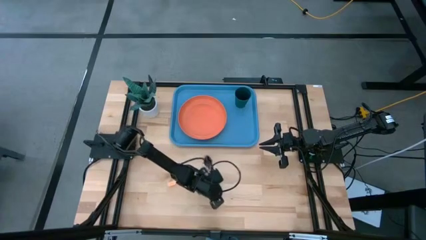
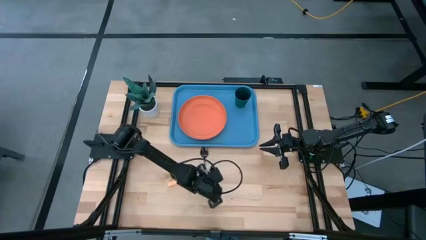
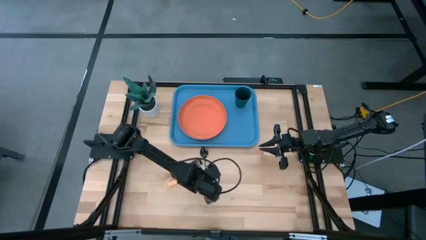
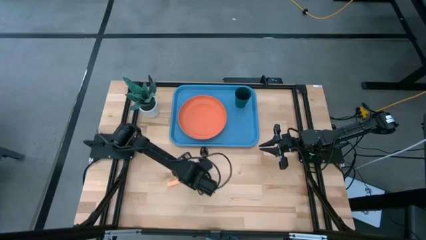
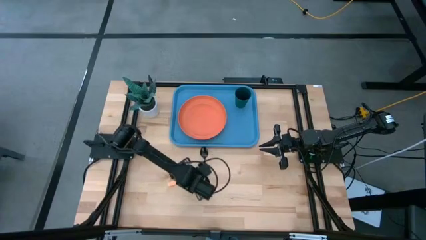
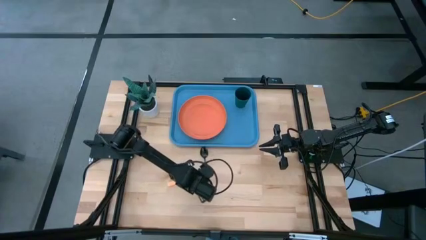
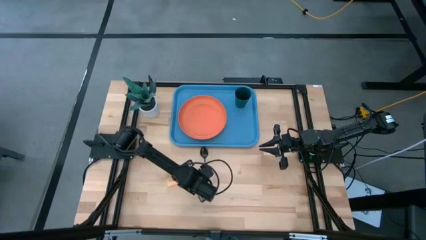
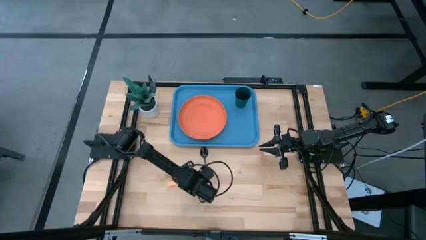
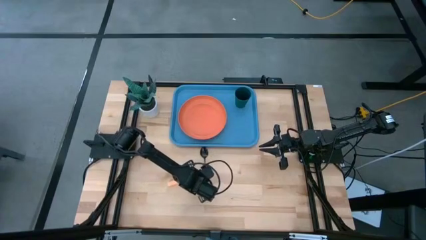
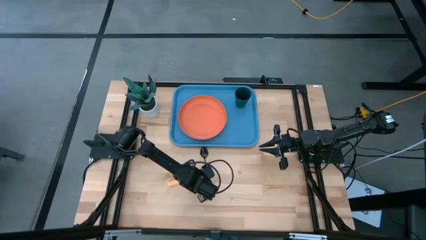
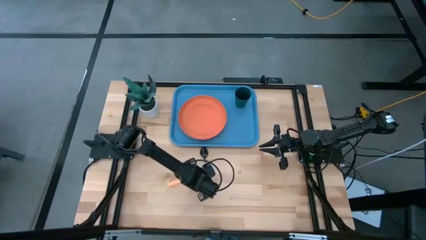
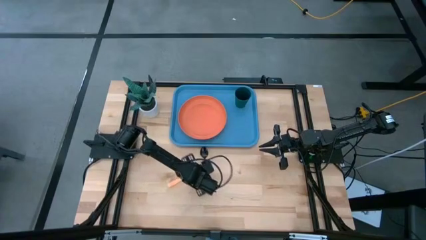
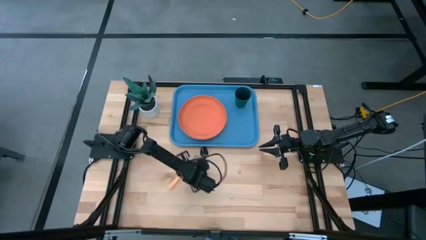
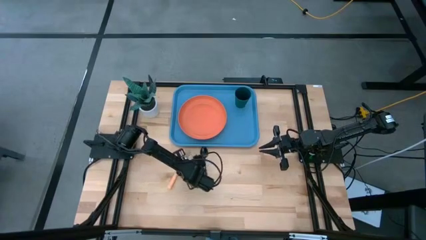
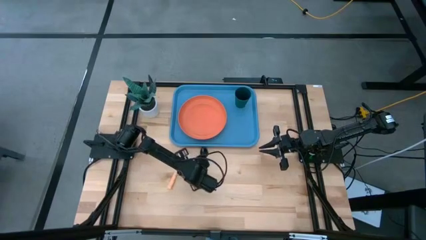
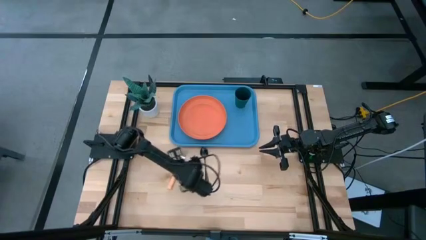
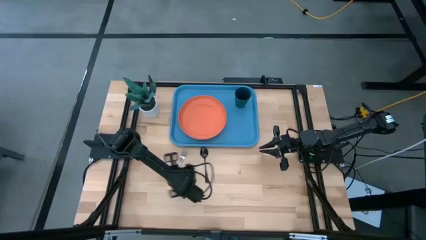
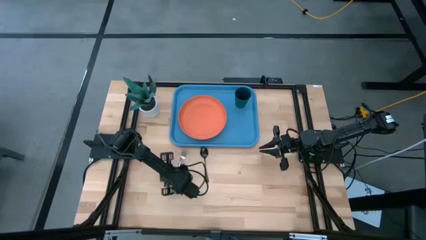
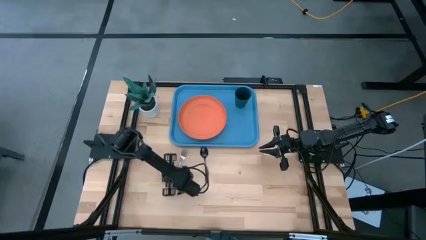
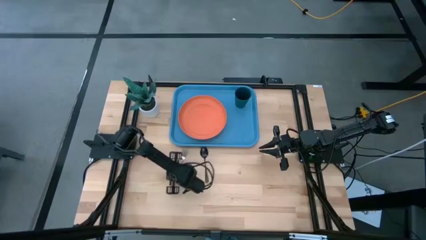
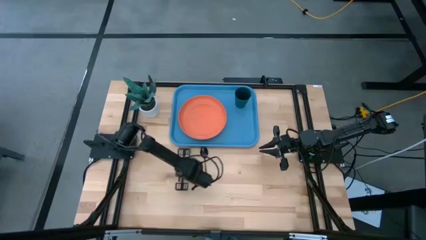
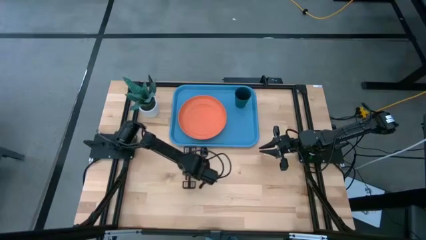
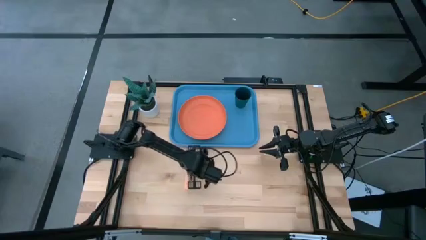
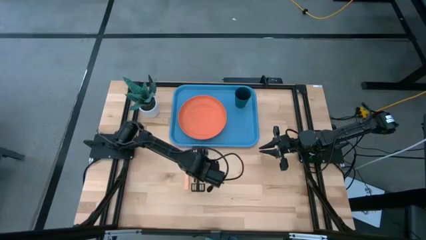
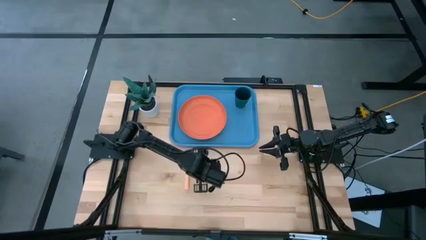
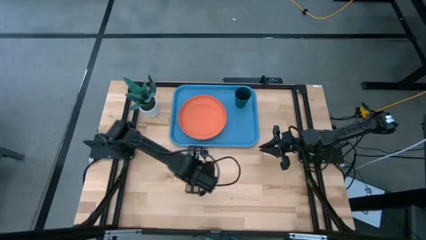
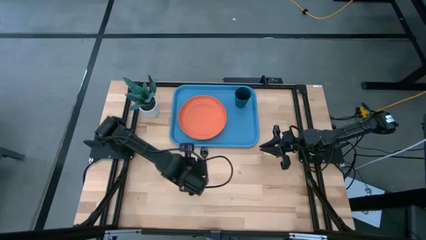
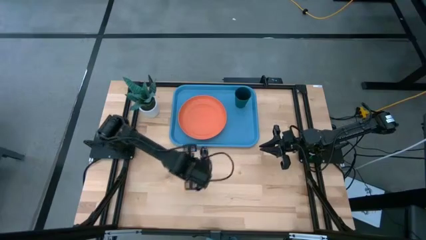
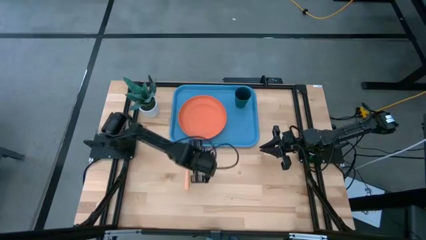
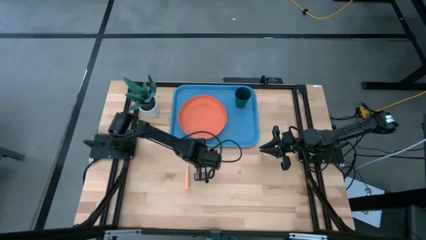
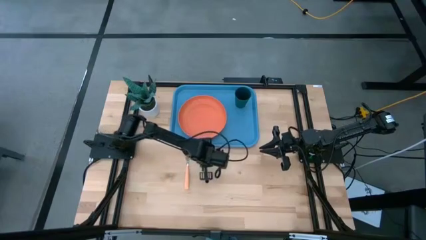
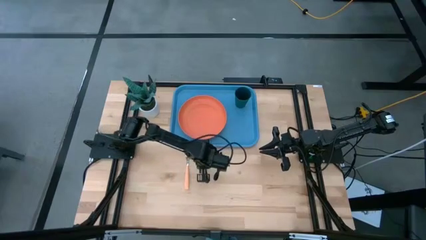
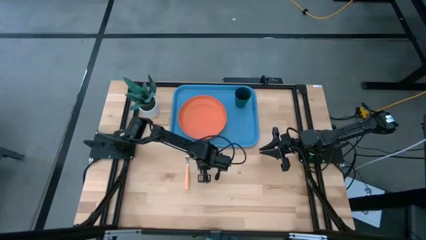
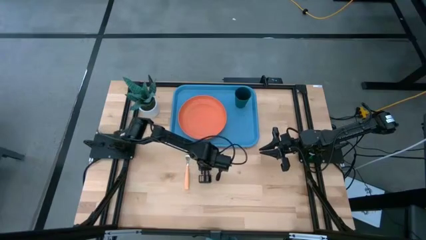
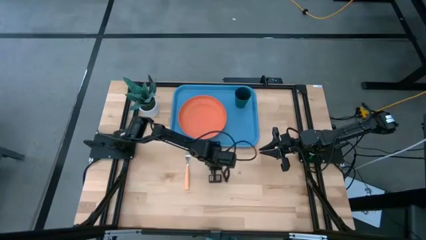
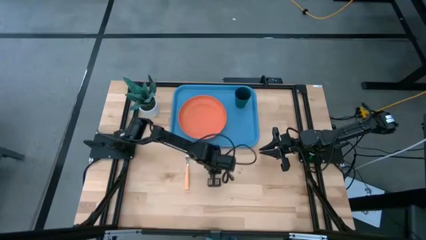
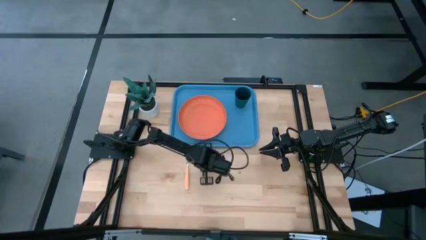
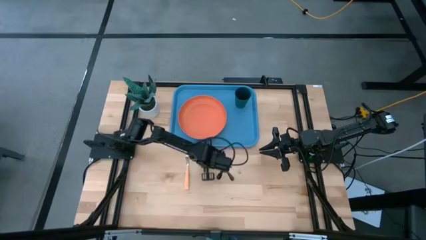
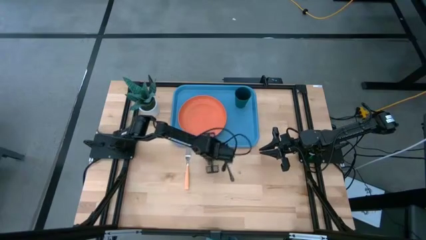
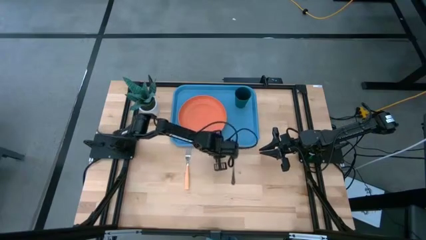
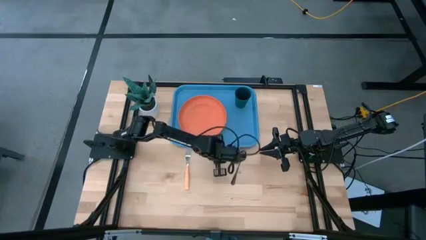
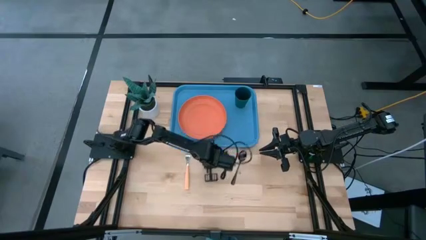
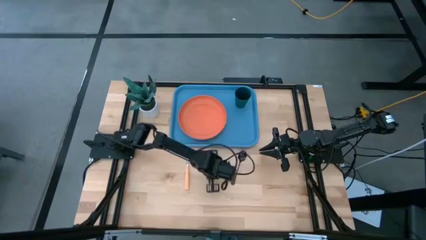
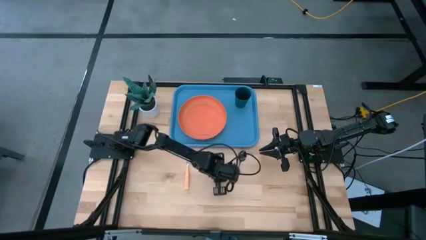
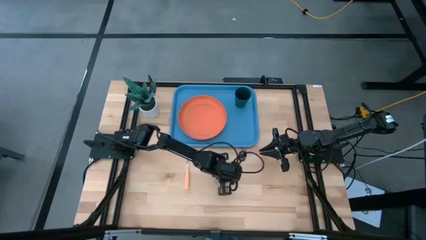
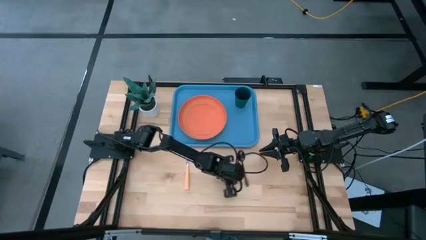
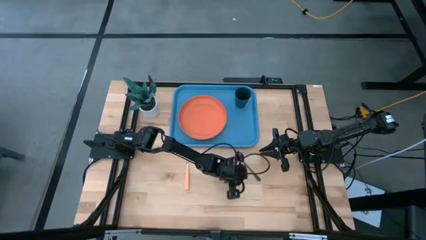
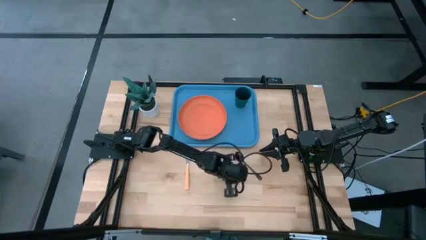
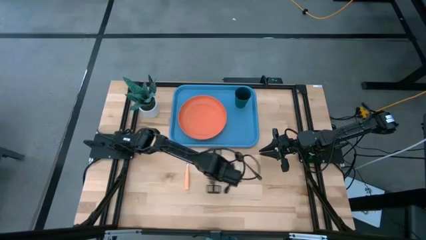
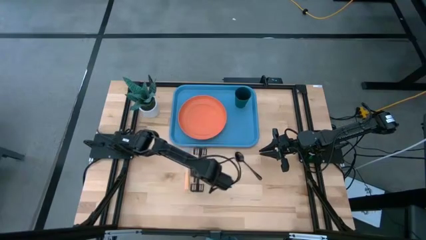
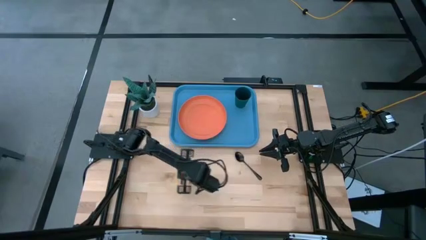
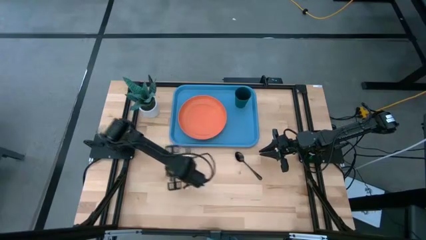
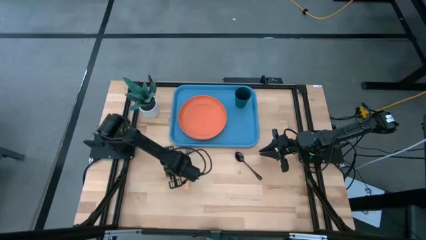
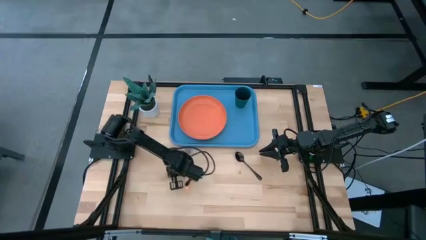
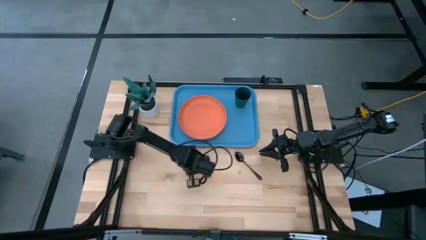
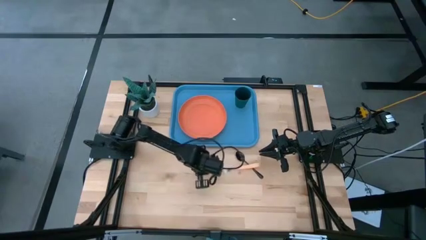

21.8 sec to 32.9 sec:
Task: Pick and place plate/cup/fork/spoon on tray
Adjust the utensils on the table
